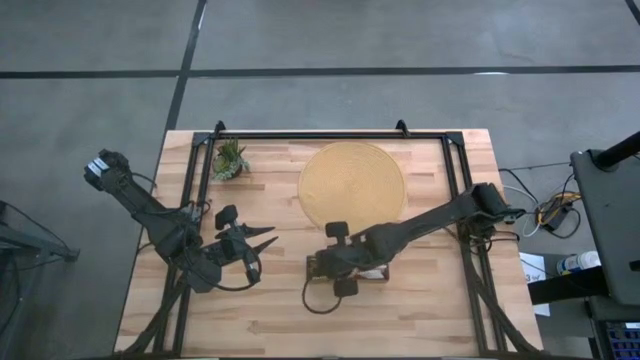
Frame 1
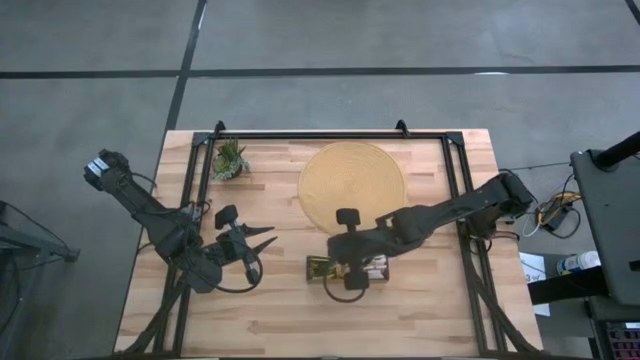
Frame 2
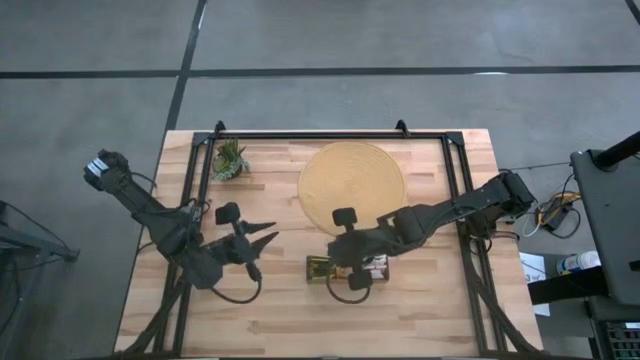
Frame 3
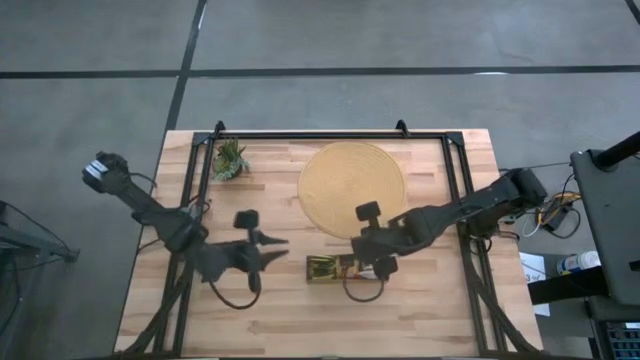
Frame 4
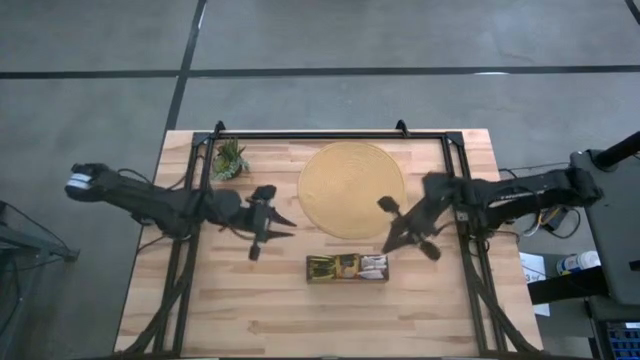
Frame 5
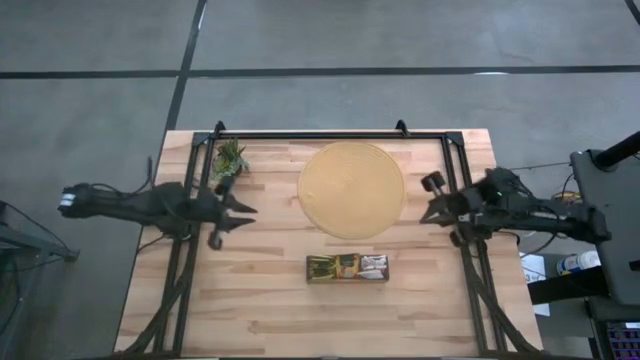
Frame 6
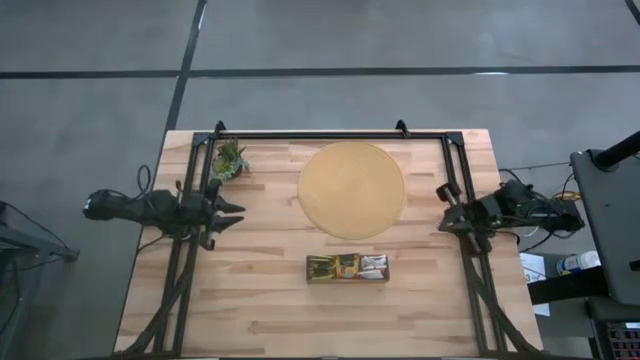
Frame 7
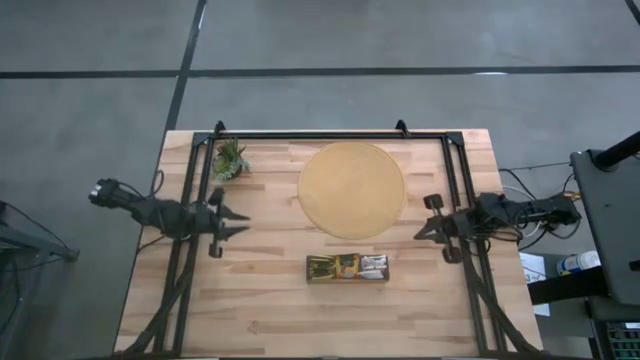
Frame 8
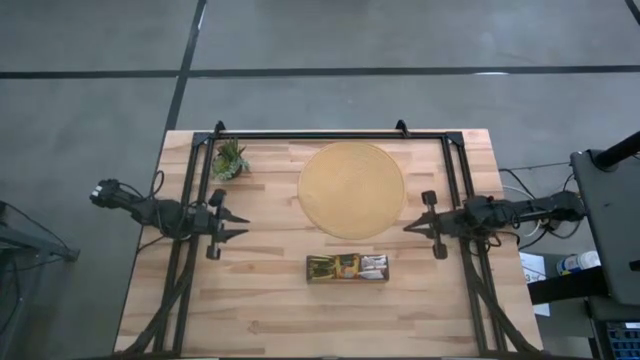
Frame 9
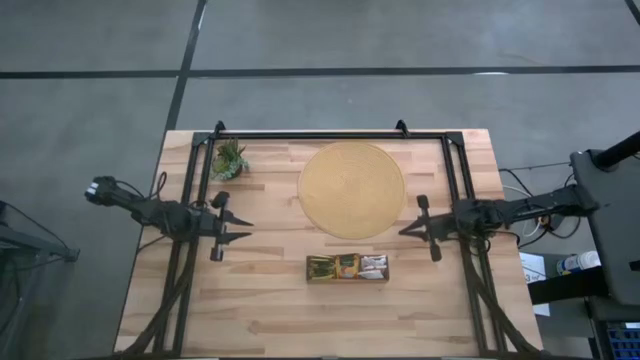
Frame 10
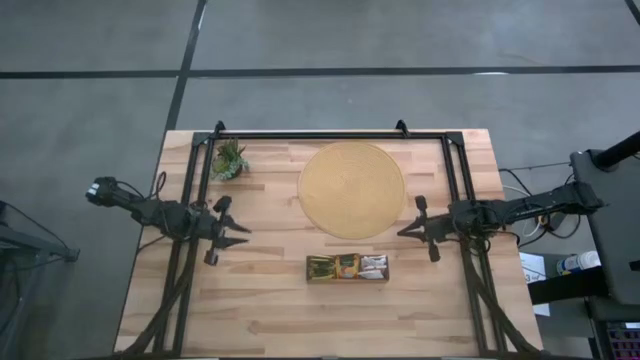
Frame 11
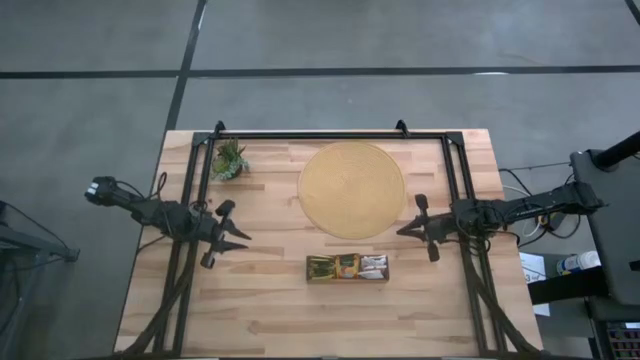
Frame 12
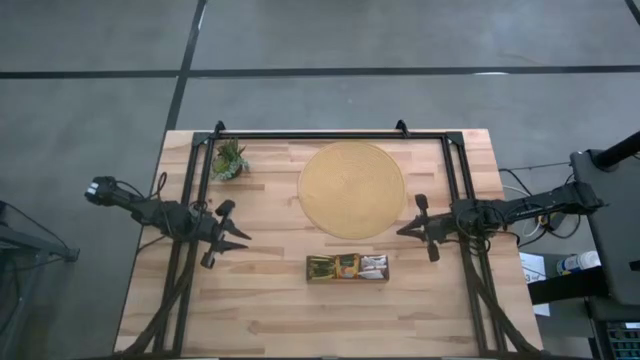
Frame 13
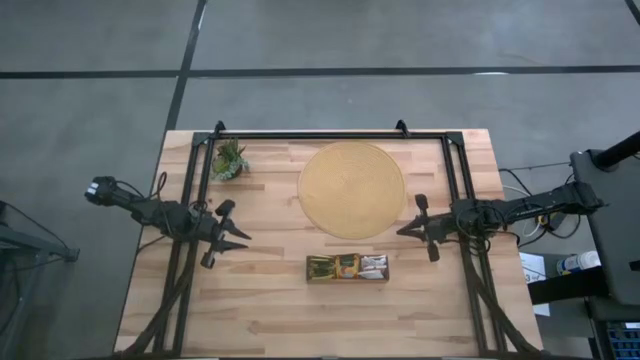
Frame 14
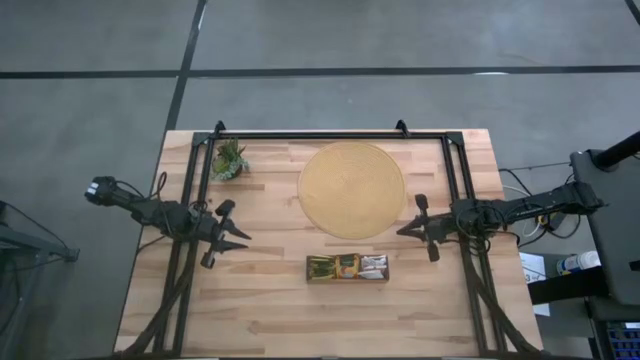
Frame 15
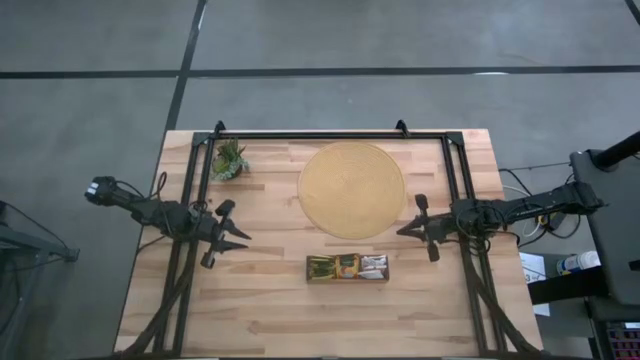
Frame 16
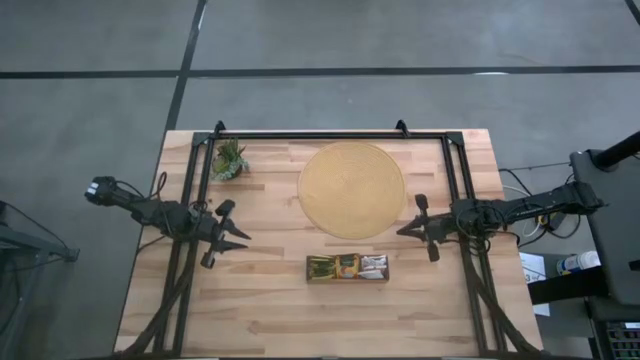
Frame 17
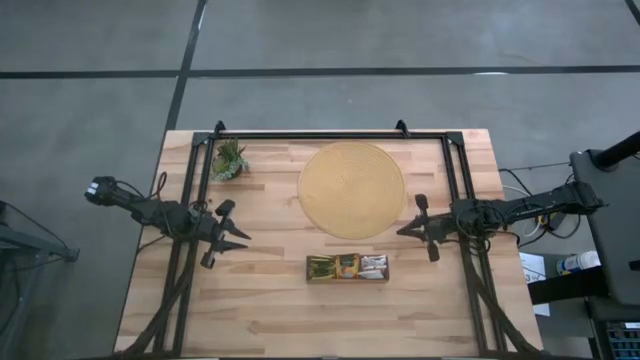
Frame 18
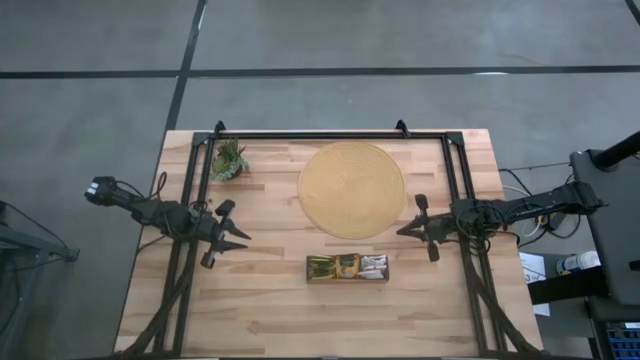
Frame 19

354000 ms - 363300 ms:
Task: Pick & Place Tea
Return to Home Position
